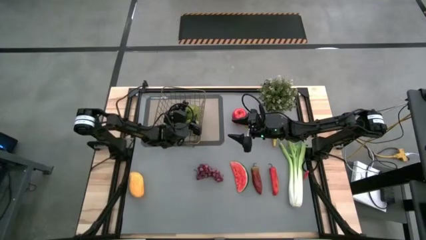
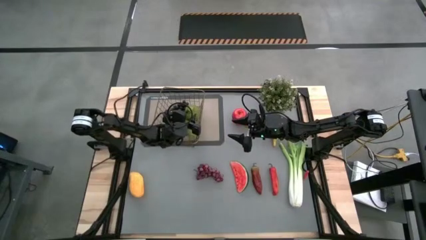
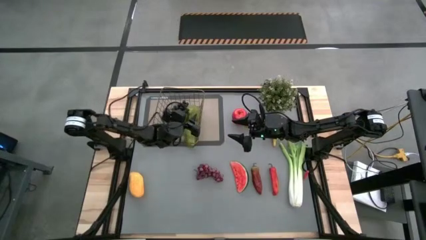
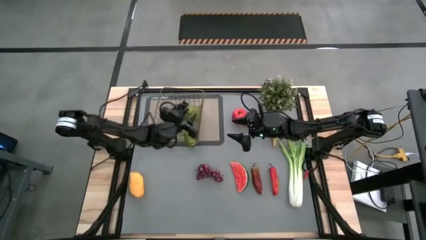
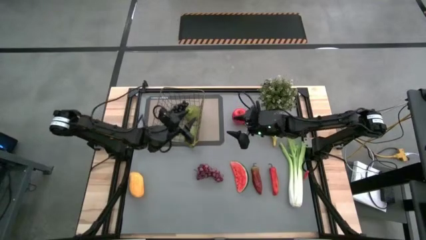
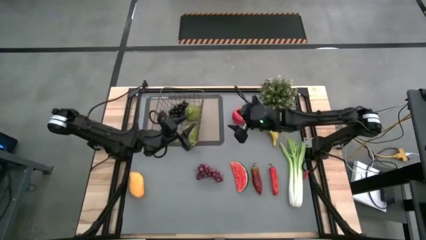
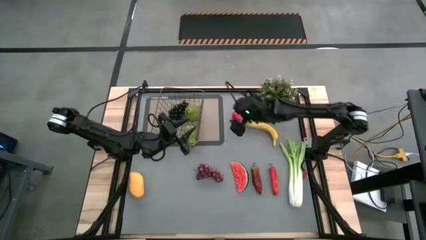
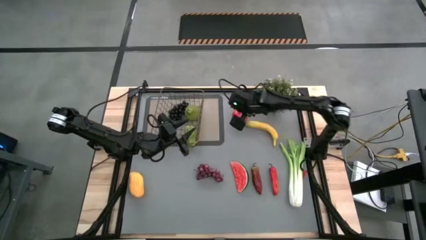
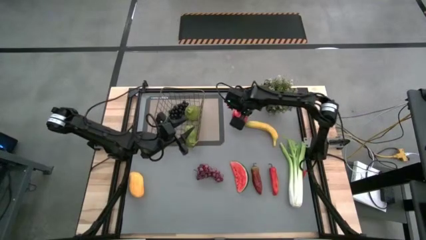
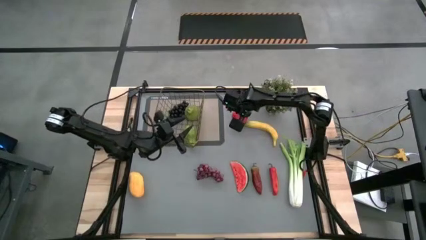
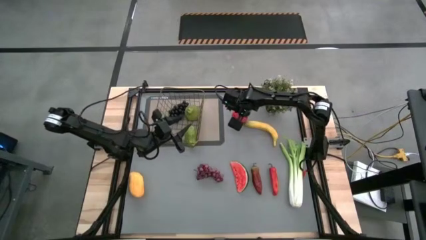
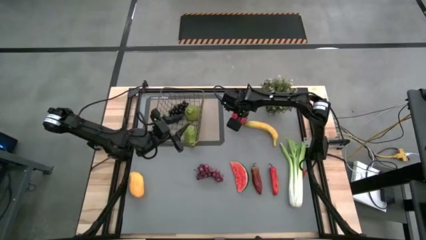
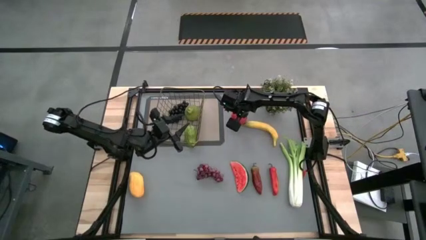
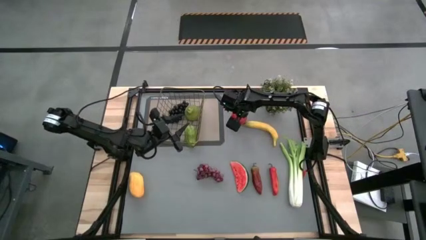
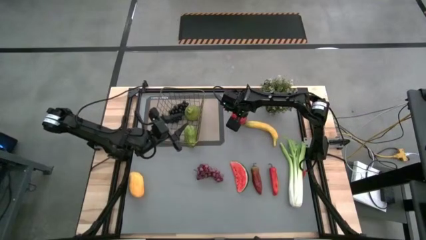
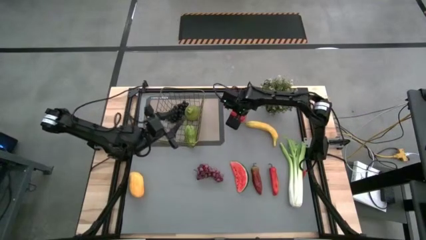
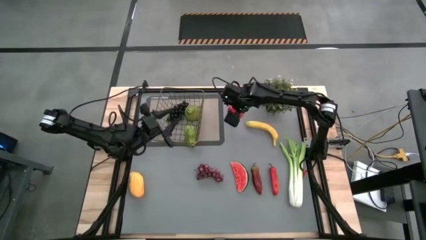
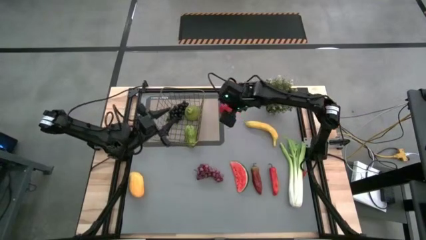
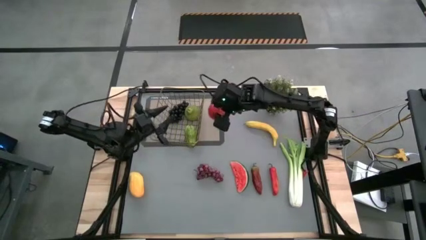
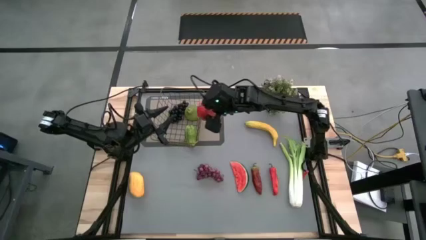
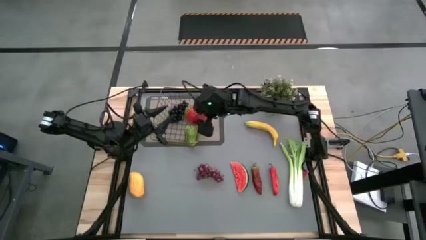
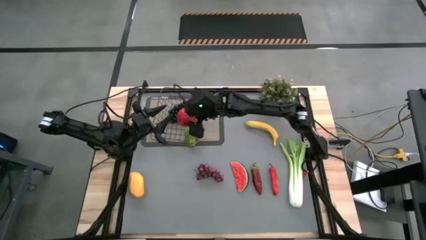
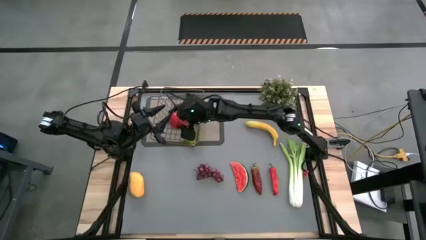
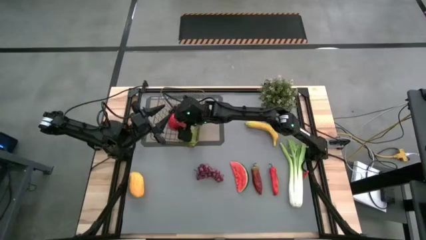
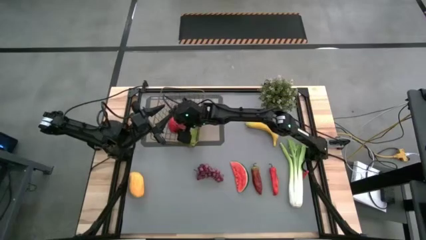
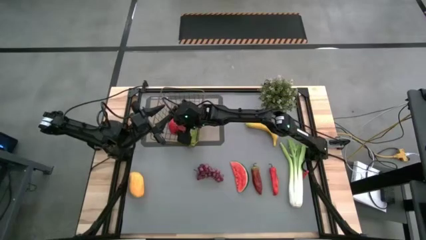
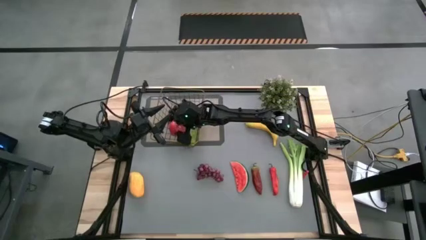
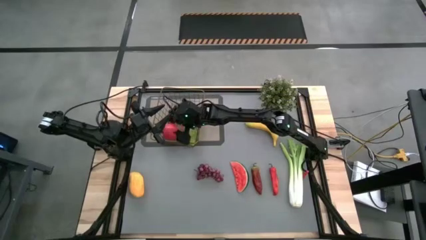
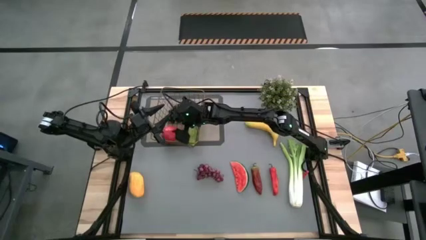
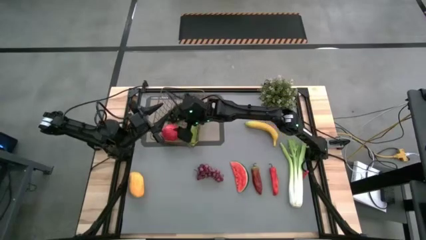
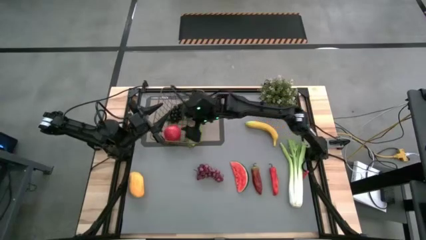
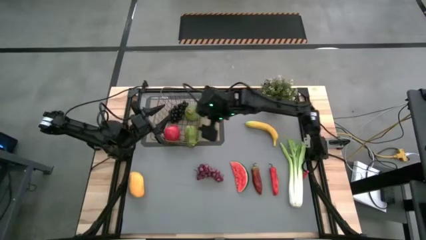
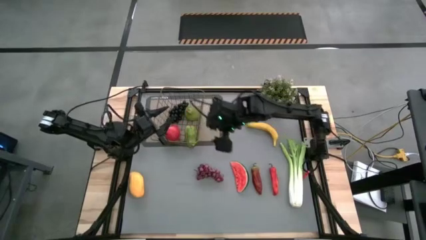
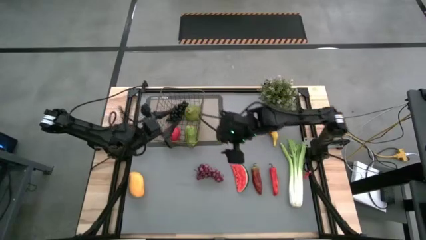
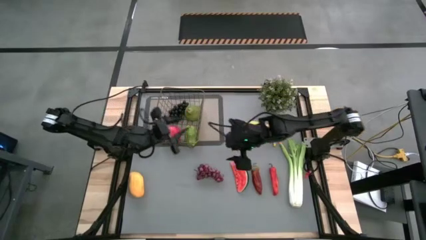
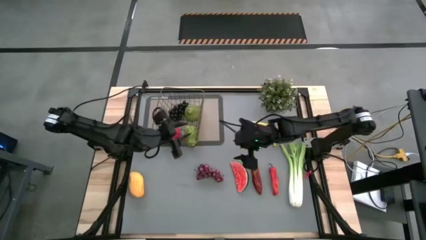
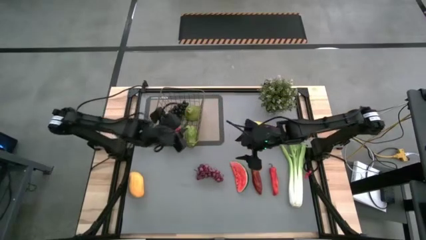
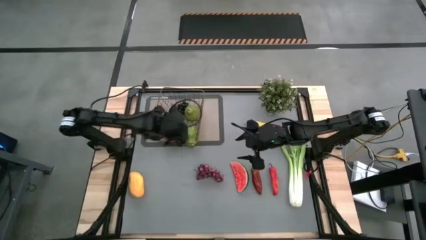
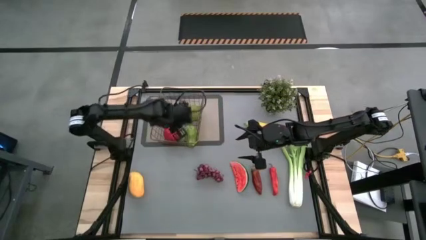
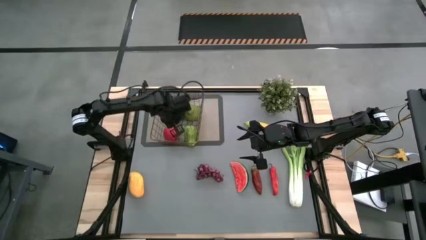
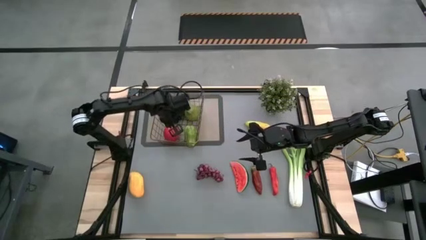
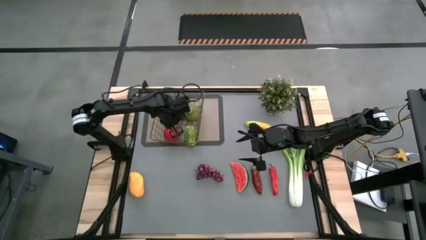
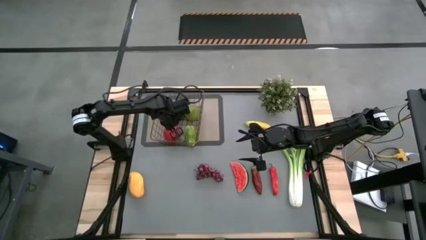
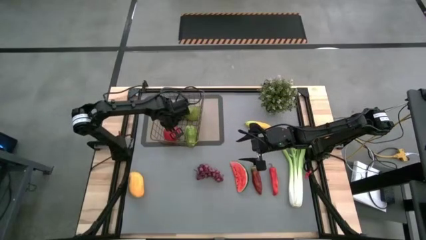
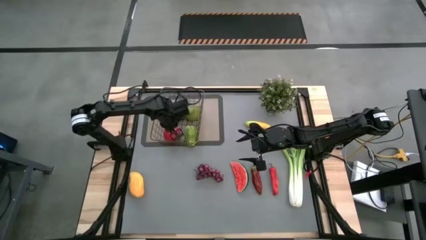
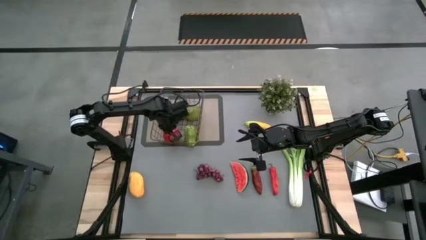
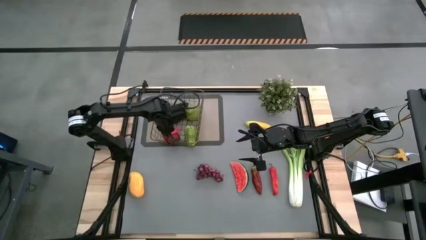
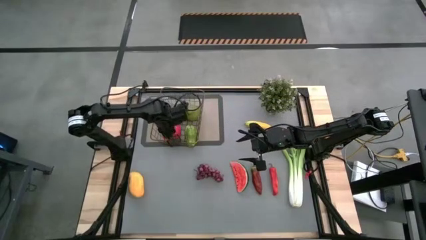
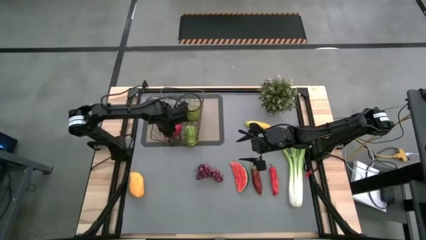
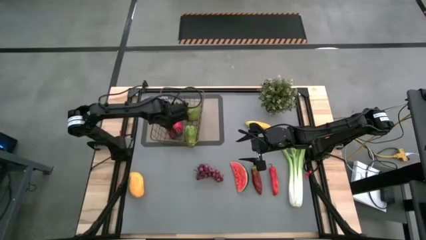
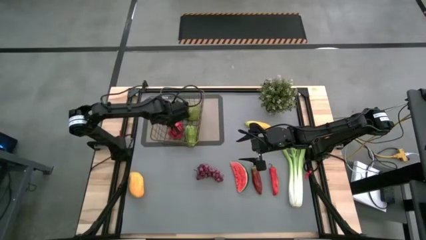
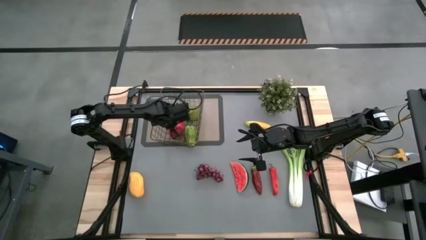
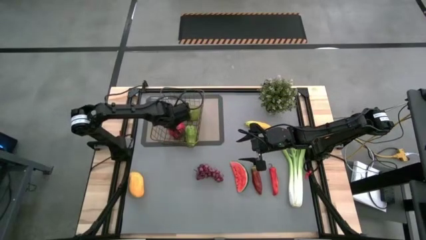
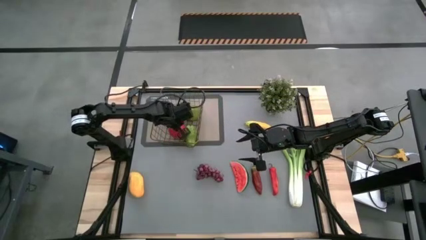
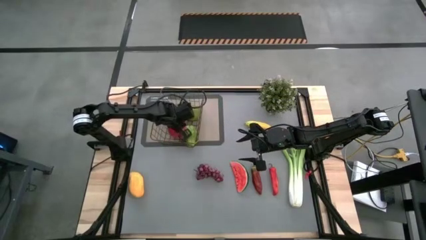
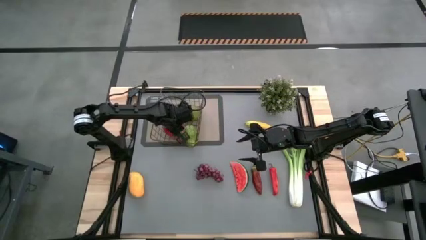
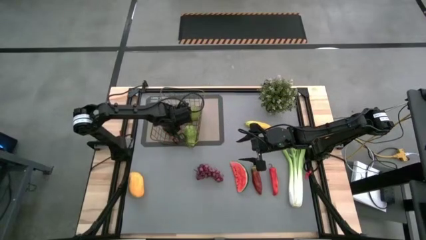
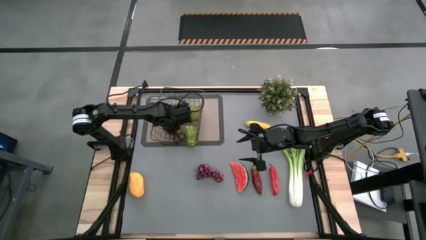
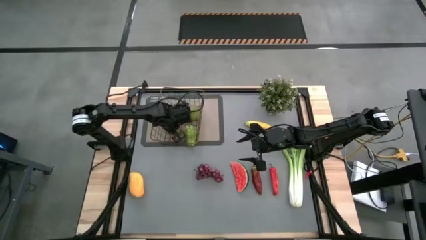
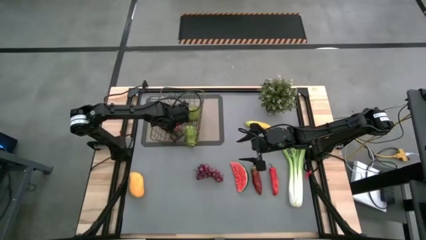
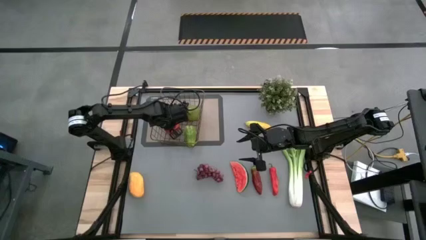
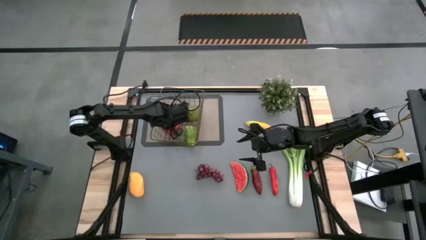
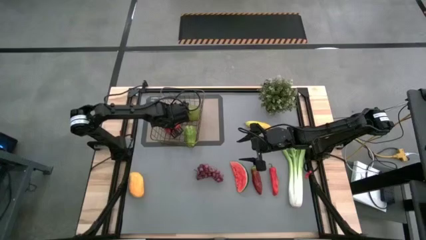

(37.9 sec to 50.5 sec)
Task: Build produce basket
Put the apple into the wire basket

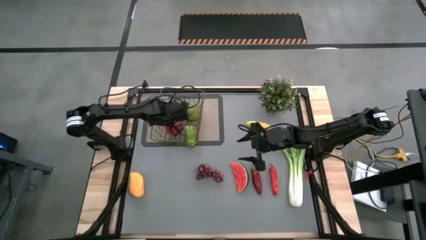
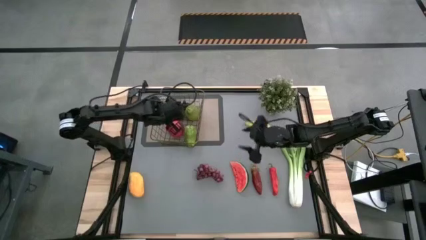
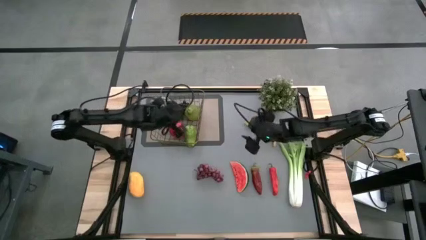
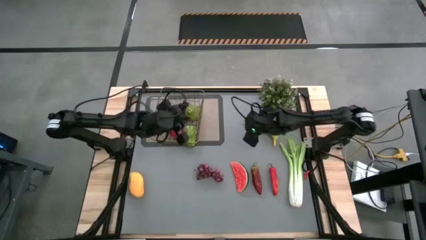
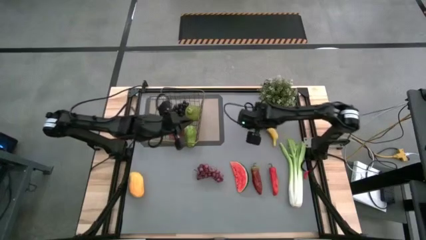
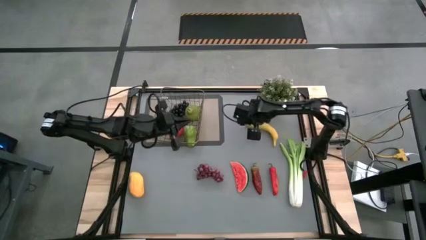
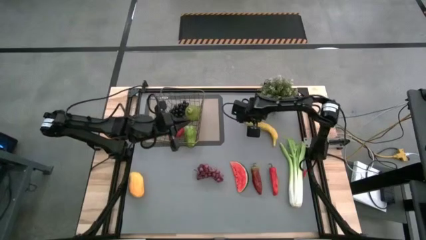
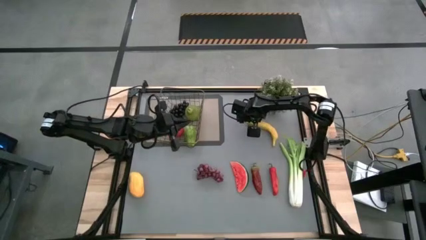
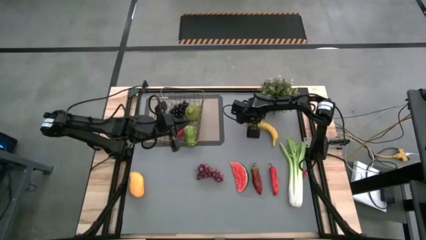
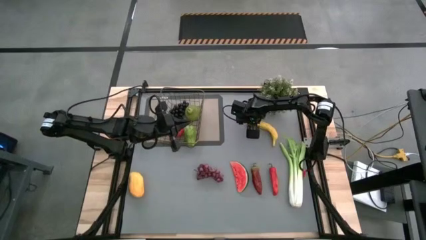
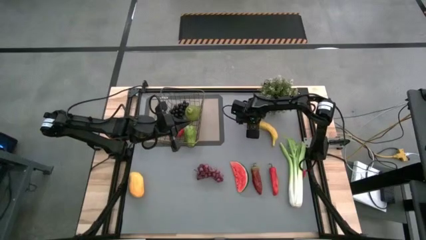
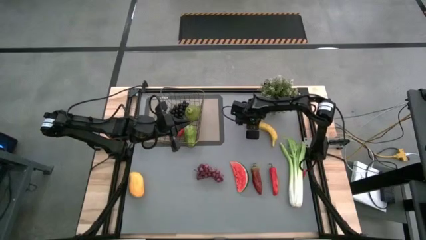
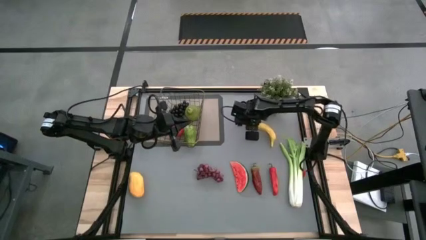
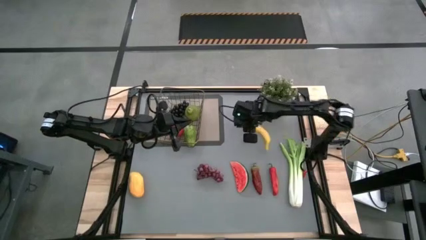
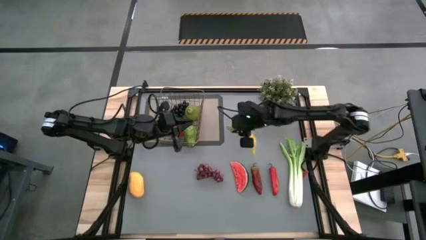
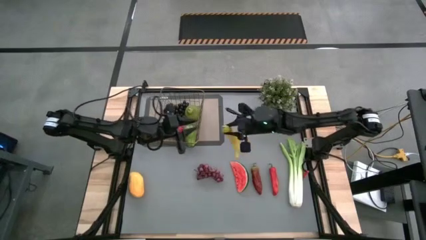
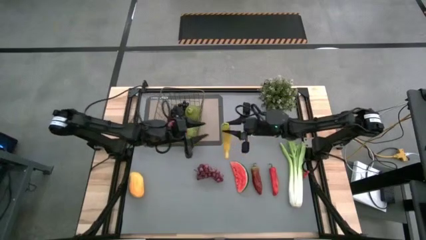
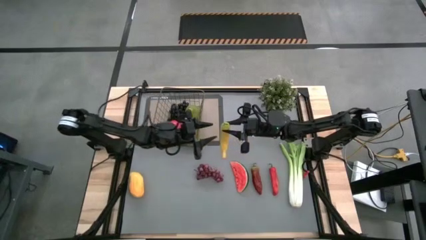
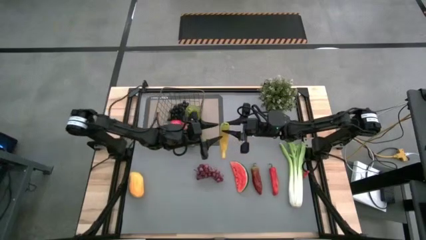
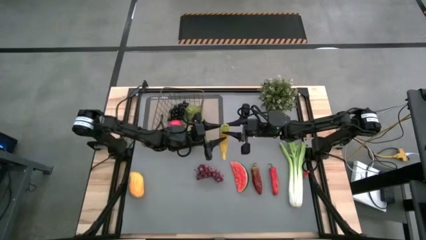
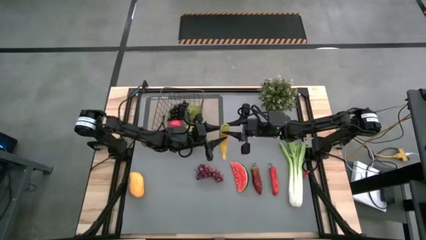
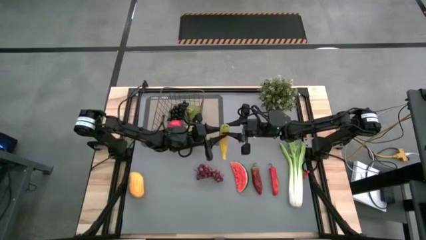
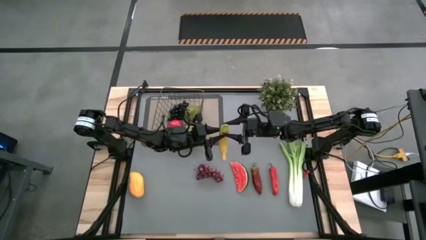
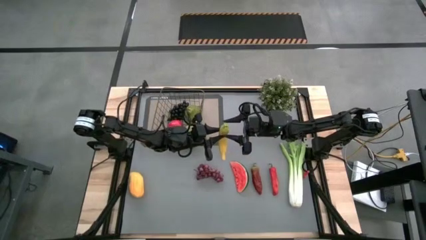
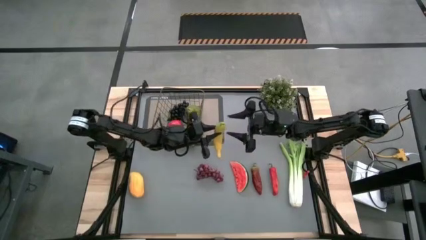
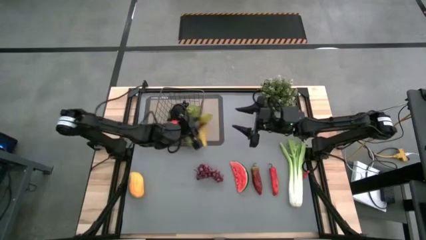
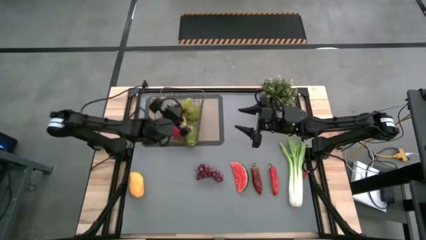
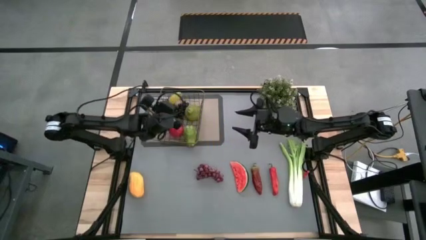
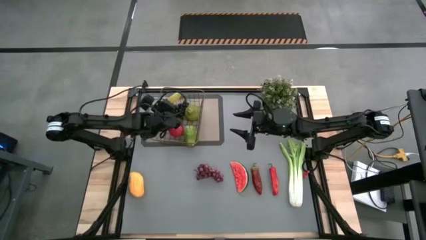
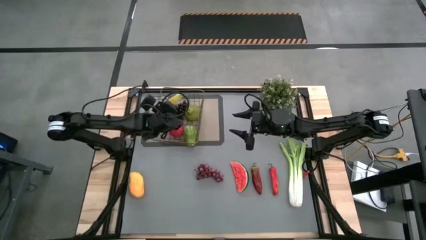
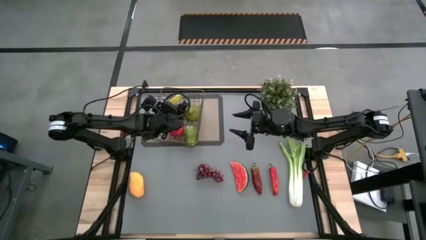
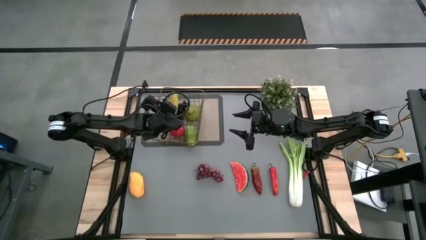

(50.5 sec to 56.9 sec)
Put the banana into the wire basket
